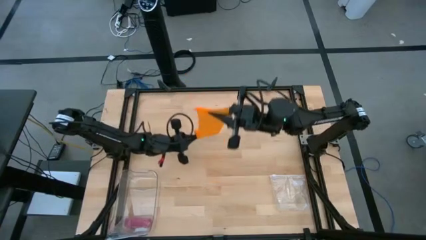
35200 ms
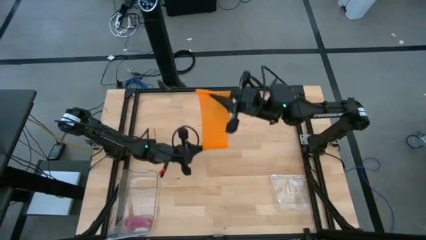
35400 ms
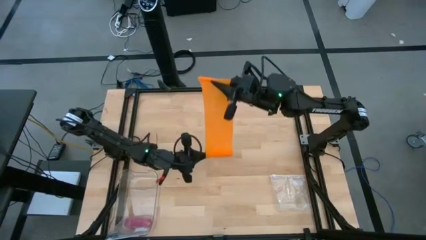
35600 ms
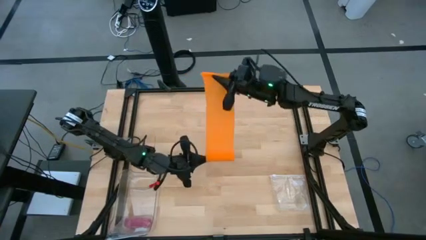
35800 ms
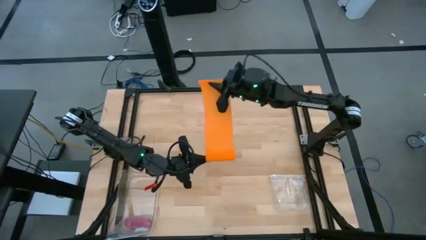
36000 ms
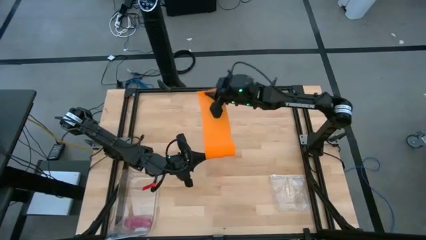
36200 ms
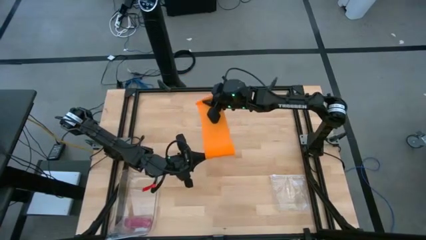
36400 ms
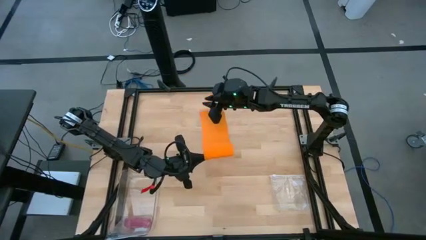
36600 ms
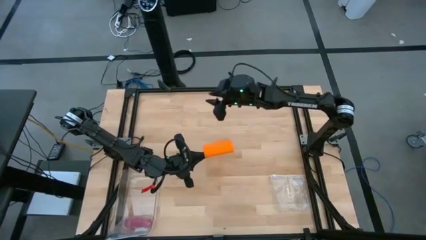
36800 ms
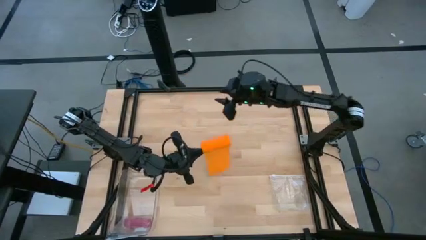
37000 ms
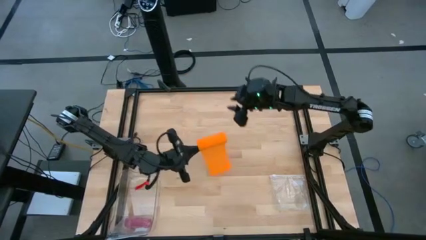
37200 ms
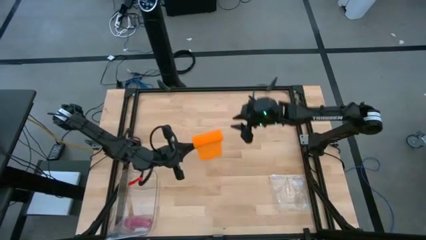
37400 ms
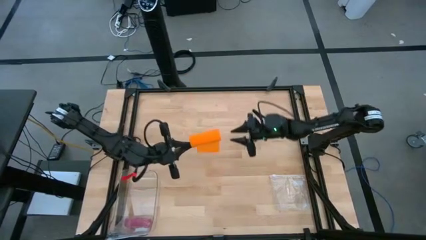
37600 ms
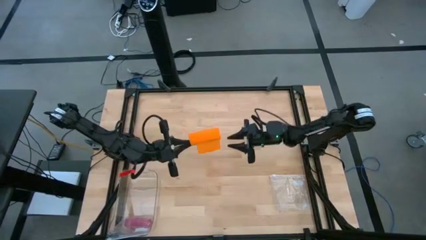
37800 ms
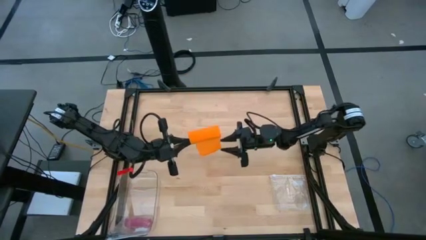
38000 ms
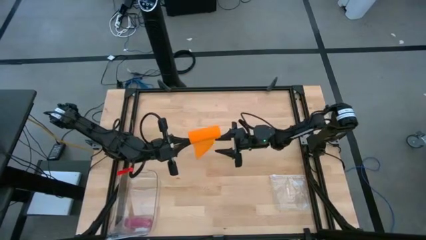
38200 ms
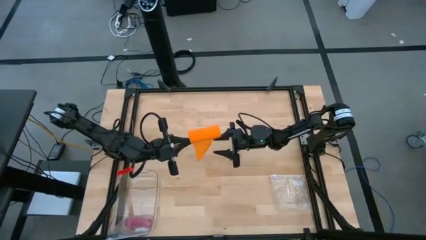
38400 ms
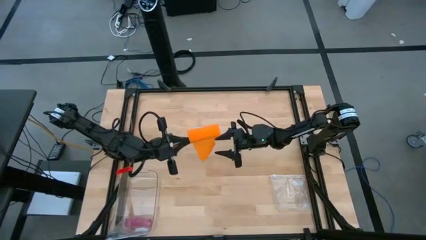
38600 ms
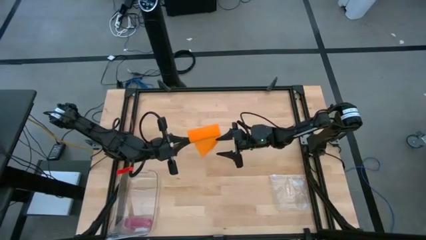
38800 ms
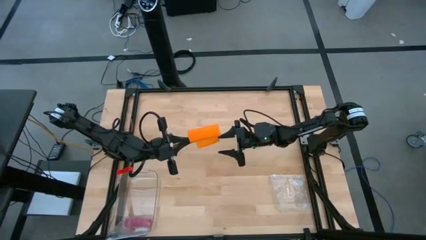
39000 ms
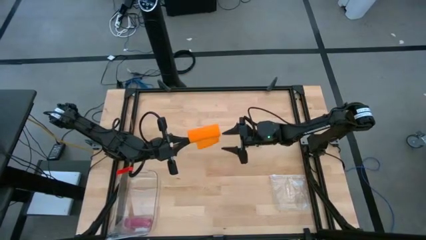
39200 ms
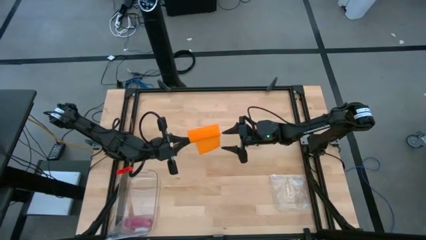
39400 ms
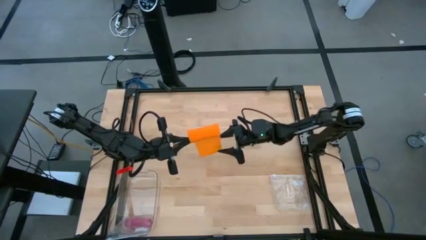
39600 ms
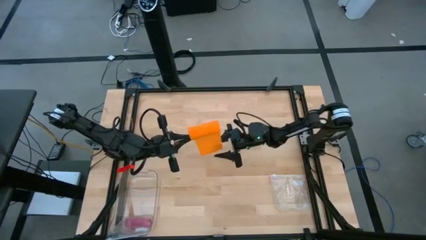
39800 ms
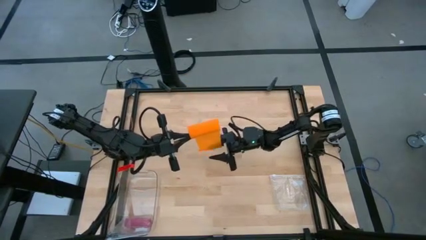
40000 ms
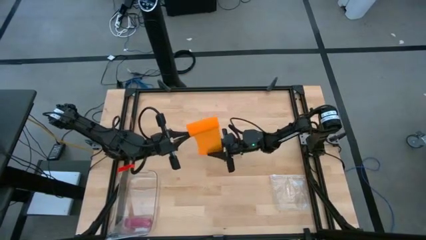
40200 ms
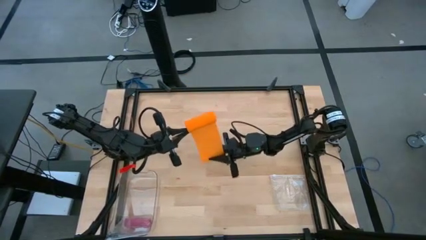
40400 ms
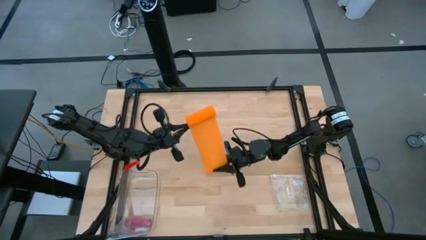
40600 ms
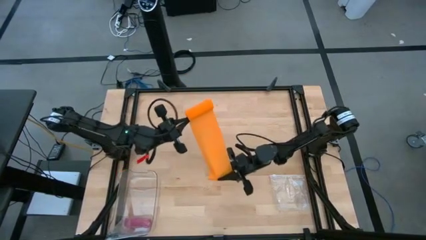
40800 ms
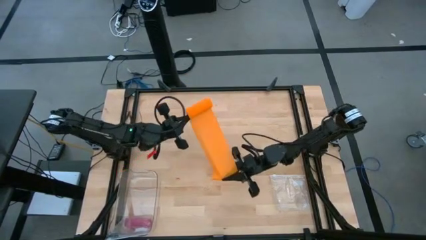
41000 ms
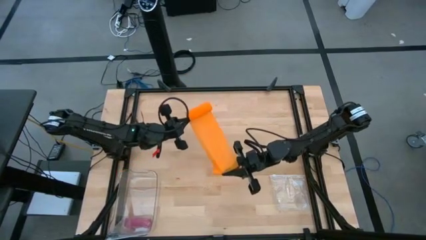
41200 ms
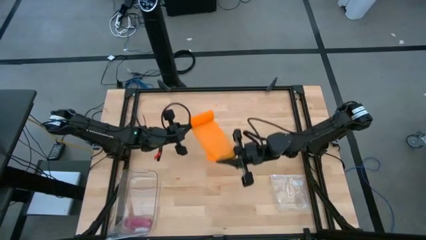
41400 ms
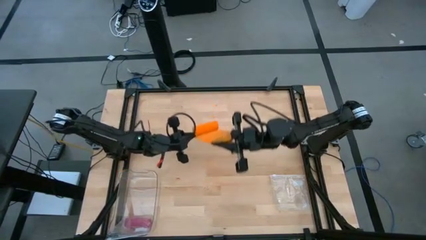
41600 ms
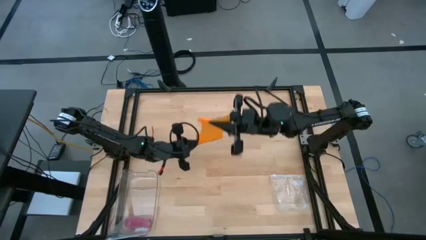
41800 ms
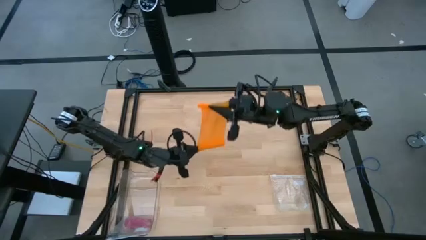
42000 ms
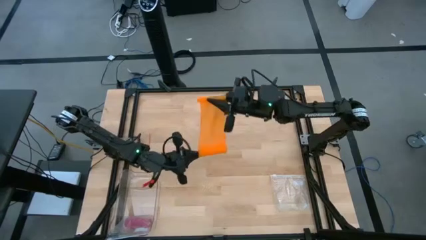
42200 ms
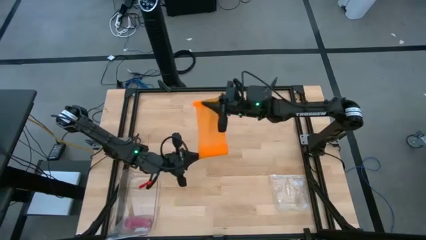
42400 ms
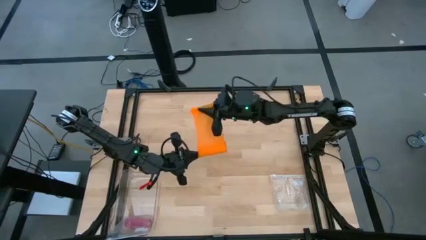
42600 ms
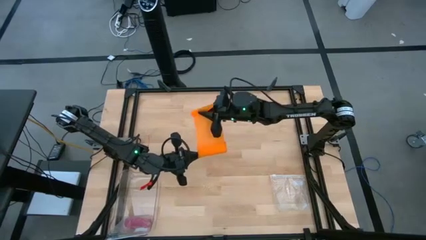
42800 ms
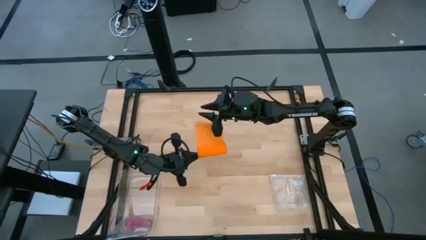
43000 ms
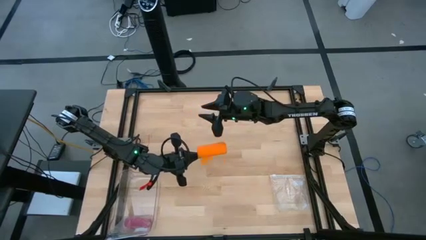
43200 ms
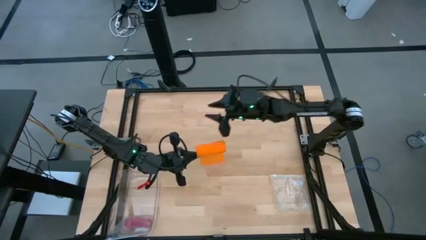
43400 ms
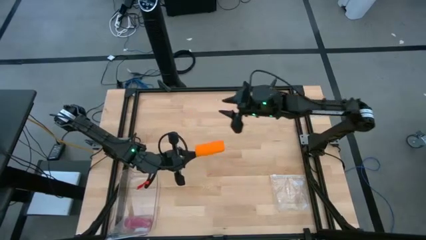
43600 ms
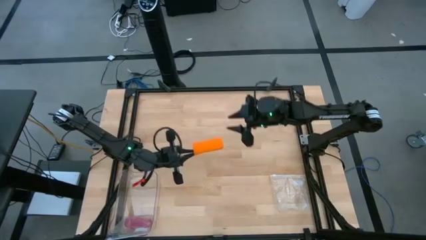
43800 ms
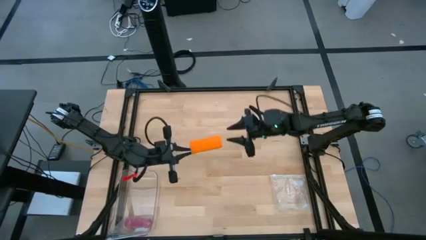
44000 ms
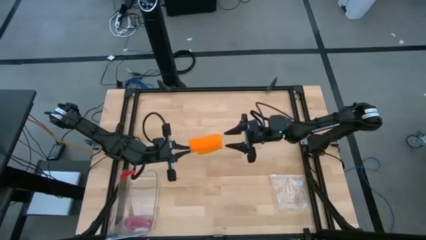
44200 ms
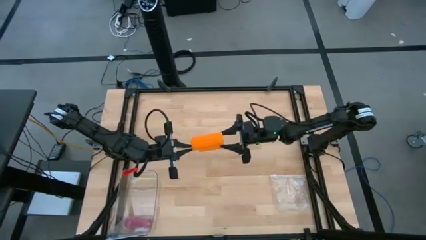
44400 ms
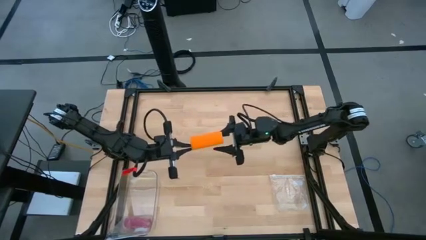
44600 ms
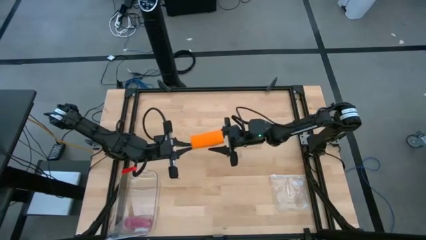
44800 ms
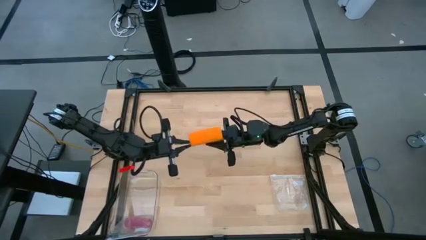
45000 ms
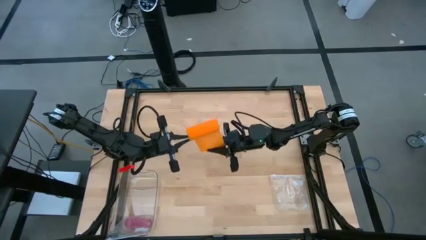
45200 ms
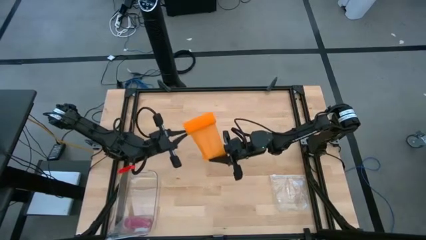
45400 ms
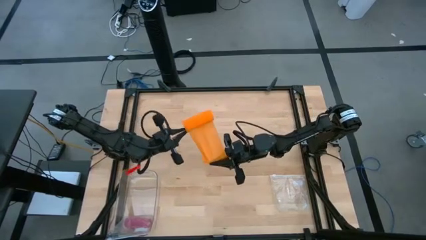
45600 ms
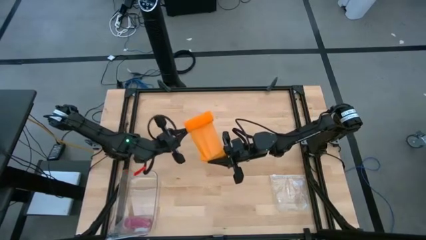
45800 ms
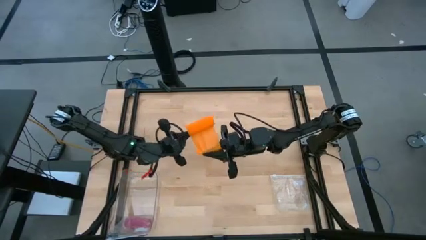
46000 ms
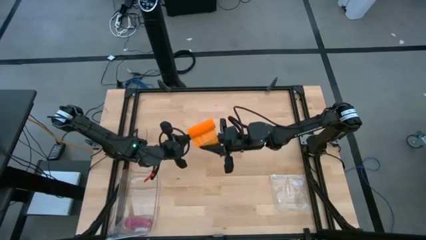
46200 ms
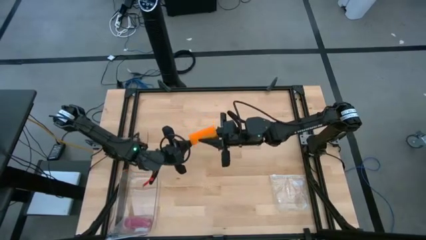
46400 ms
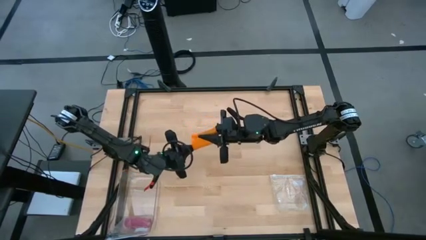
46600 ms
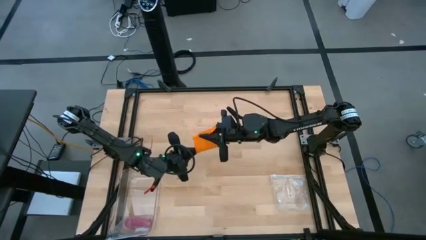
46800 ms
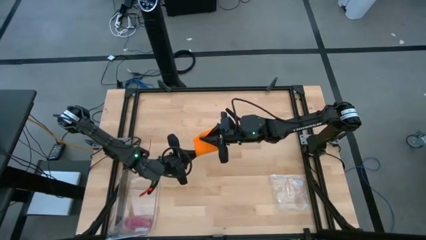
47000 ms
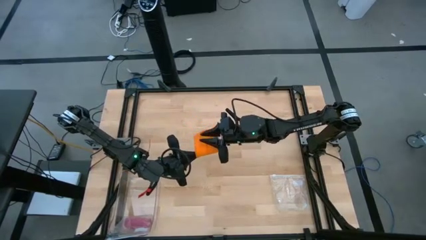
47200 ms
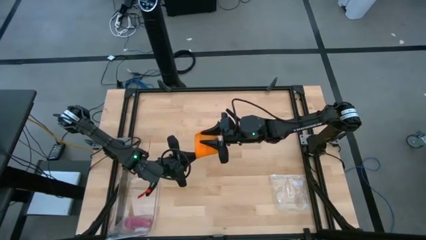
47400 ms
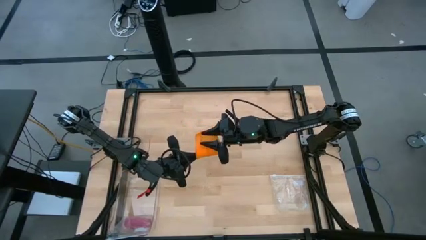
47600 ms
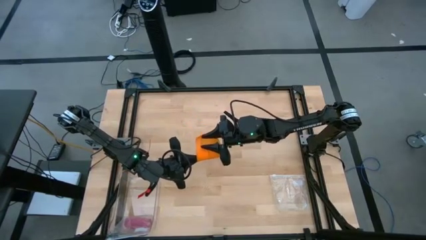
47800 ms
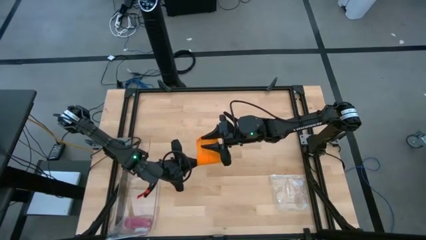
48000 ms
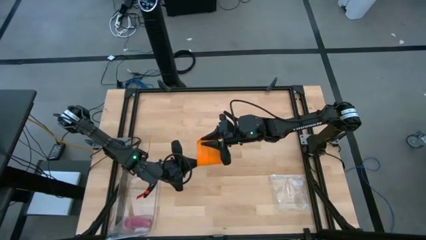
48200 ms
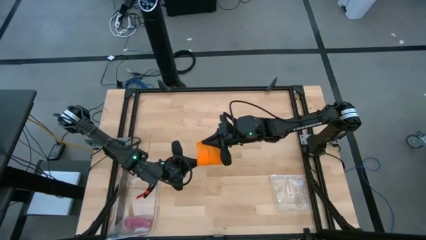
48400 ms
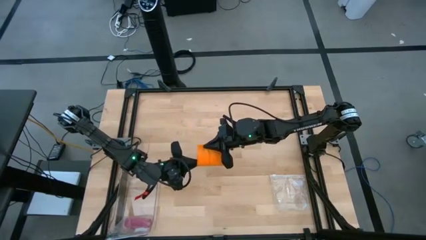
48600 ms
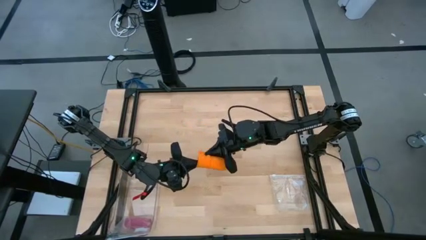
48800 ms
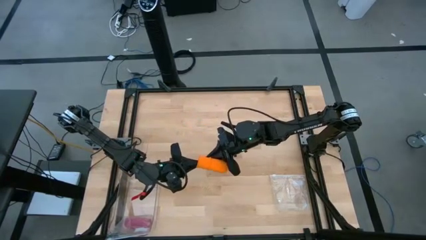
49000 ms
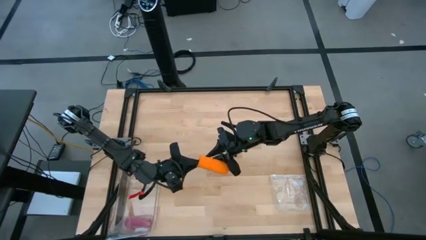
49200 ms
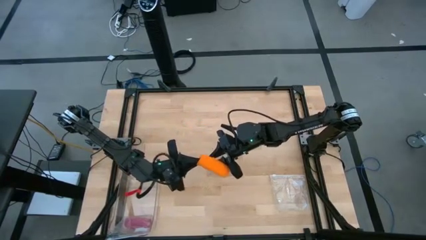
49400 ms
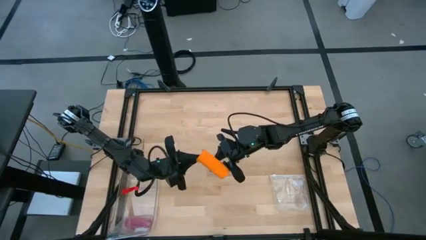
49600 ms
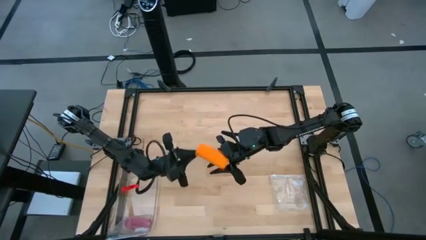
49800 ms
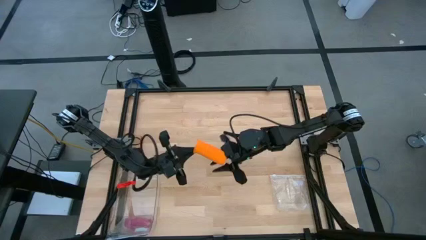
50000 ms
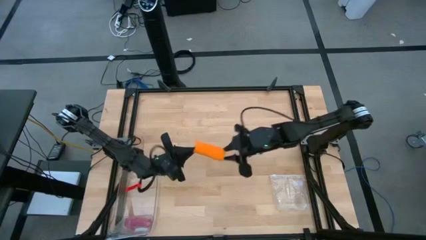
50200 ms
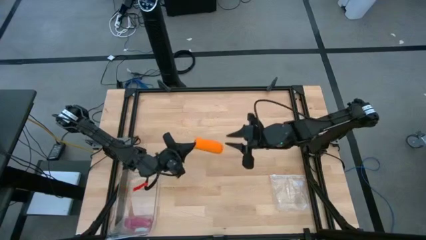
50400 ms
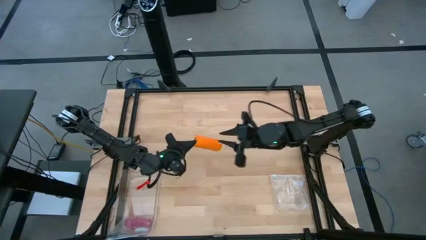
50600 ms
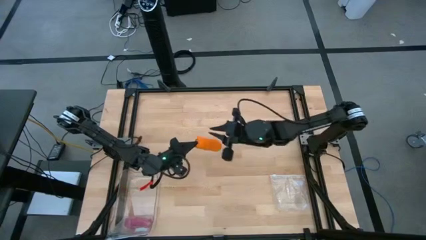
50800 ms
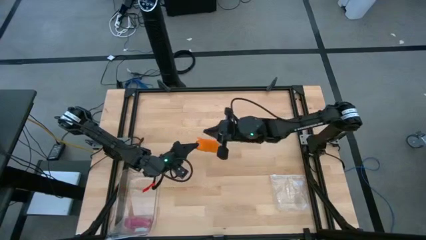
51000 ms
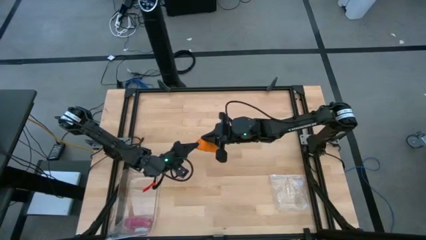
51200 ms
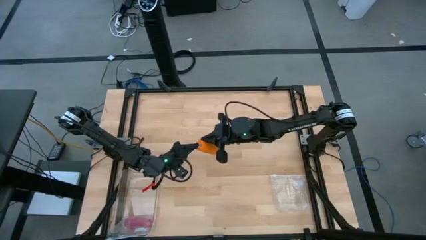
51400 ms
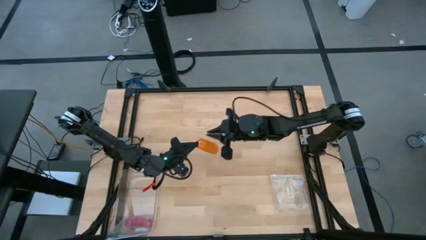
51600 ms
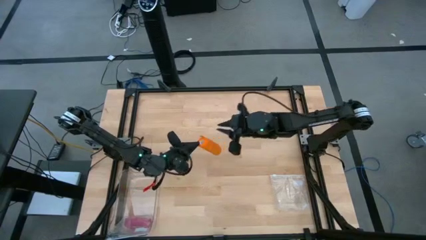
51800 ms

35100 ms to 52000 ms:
Task: Roll bandage
Roll the orange bandage
